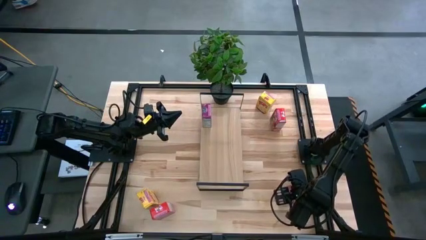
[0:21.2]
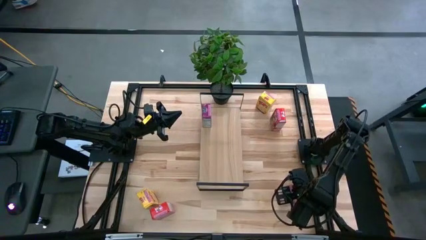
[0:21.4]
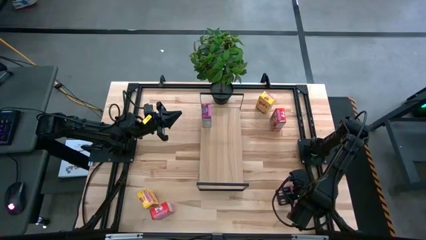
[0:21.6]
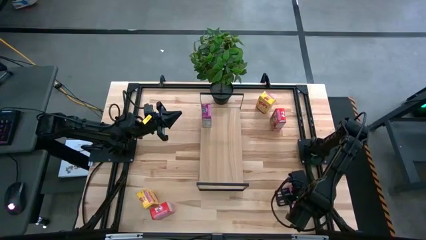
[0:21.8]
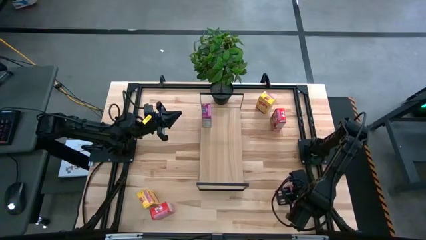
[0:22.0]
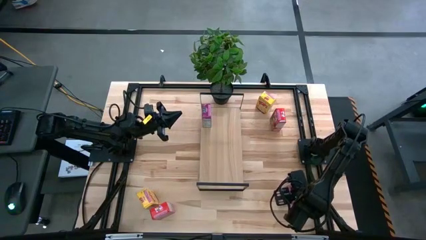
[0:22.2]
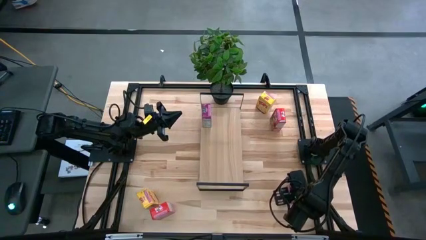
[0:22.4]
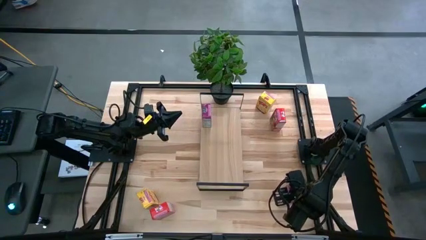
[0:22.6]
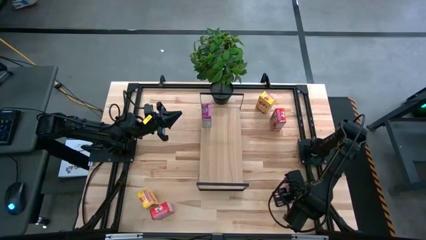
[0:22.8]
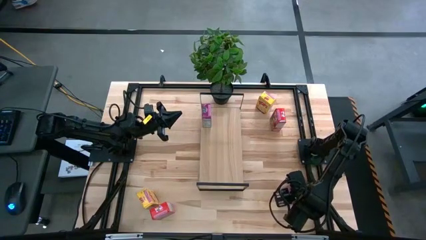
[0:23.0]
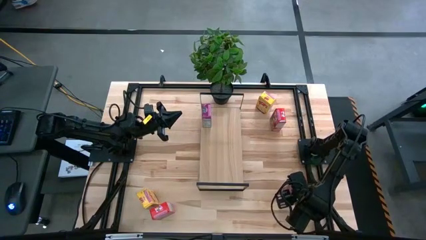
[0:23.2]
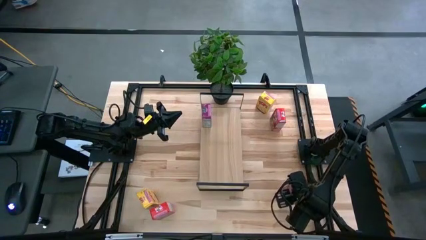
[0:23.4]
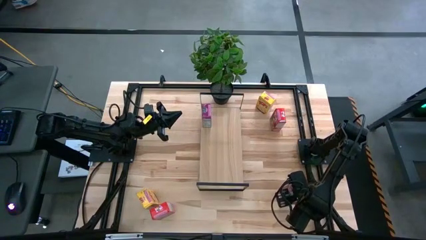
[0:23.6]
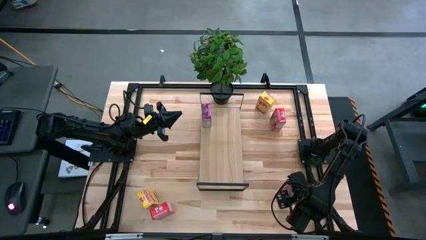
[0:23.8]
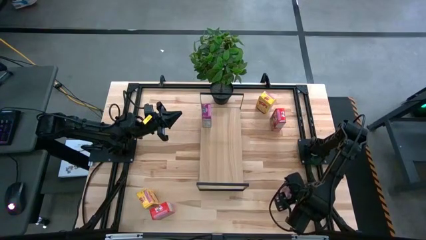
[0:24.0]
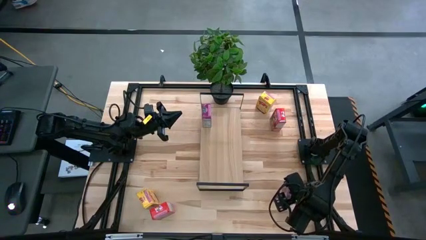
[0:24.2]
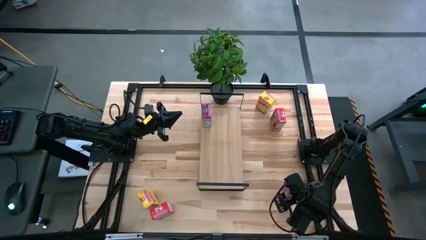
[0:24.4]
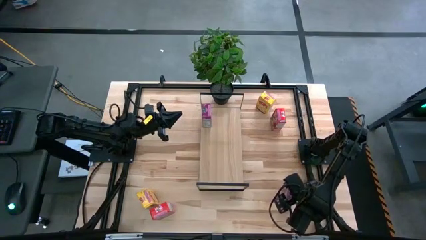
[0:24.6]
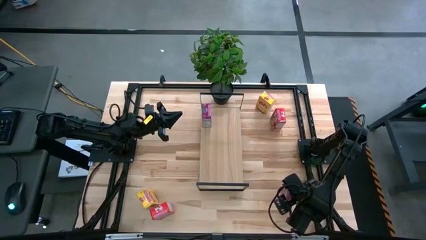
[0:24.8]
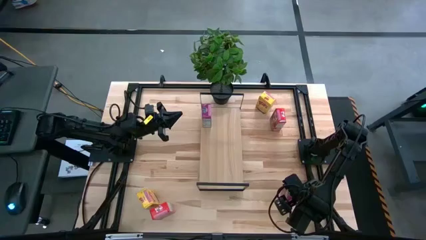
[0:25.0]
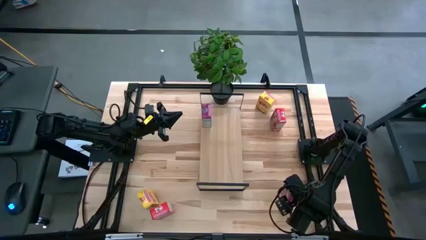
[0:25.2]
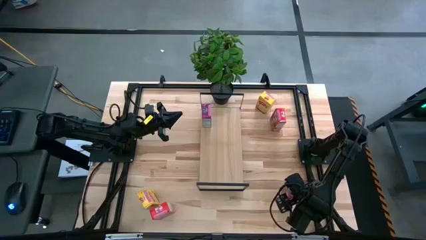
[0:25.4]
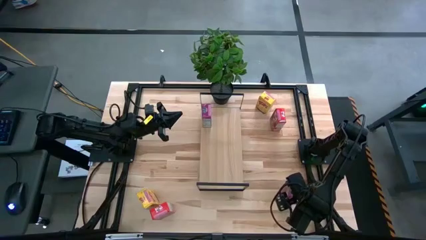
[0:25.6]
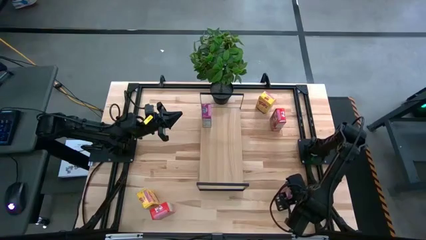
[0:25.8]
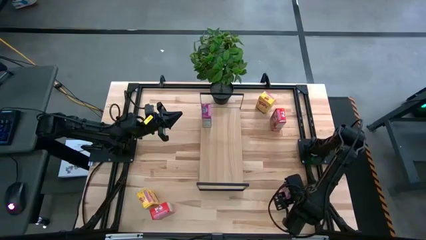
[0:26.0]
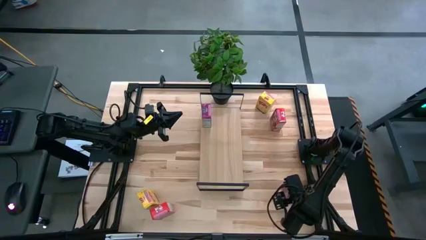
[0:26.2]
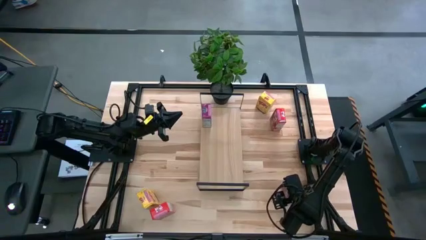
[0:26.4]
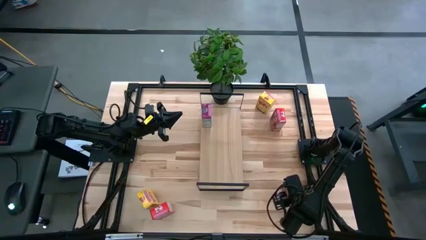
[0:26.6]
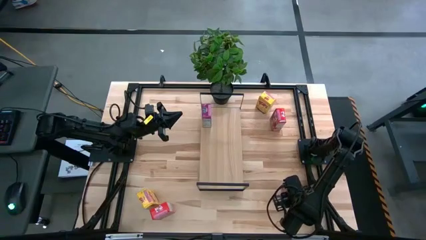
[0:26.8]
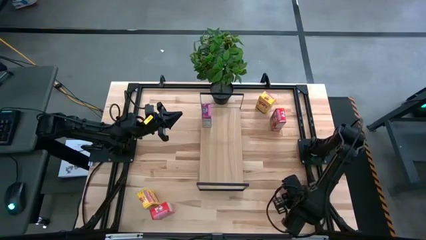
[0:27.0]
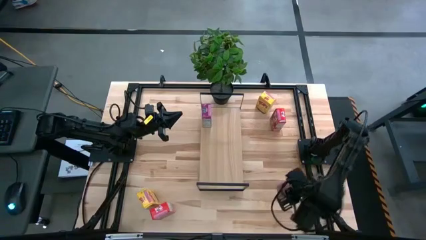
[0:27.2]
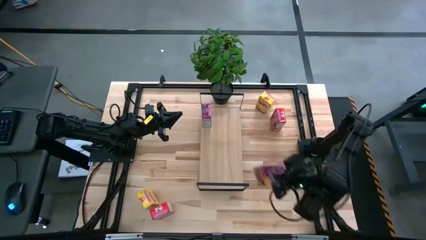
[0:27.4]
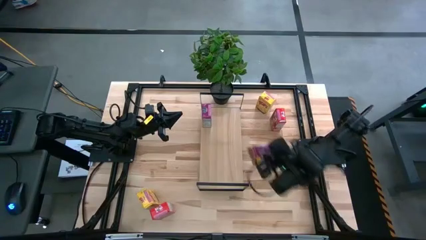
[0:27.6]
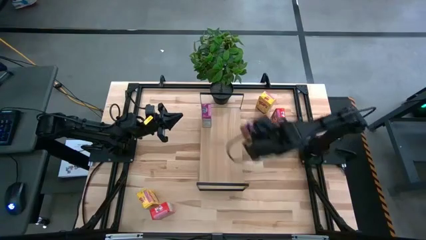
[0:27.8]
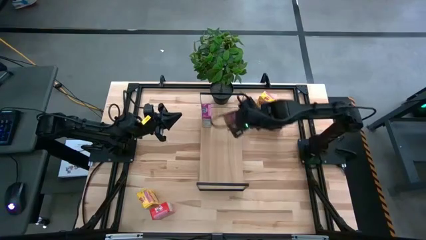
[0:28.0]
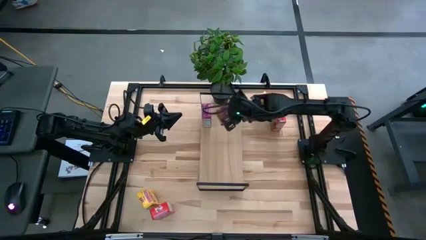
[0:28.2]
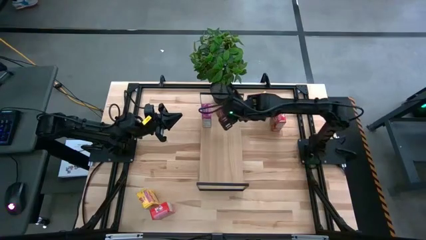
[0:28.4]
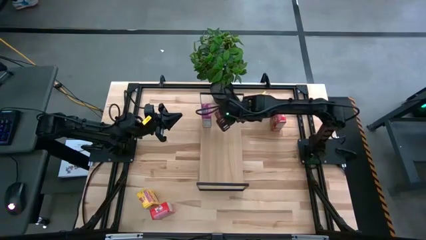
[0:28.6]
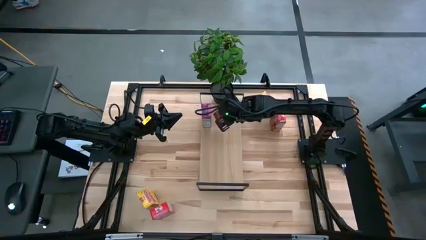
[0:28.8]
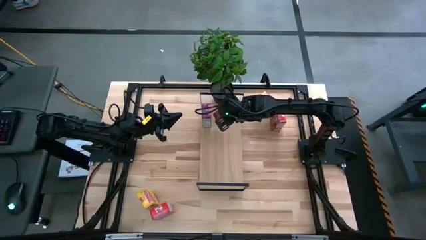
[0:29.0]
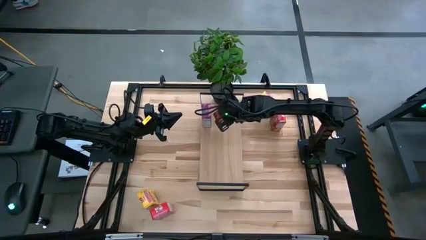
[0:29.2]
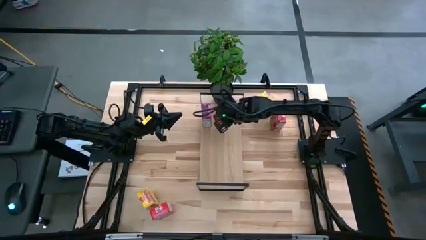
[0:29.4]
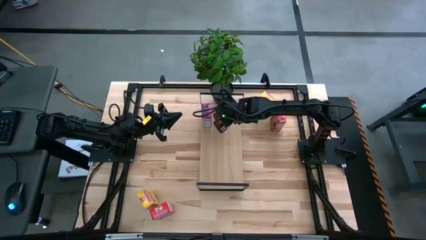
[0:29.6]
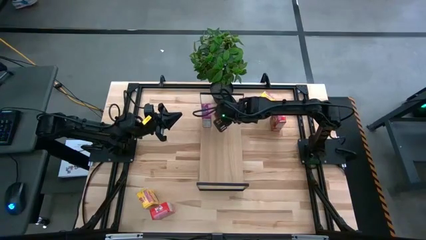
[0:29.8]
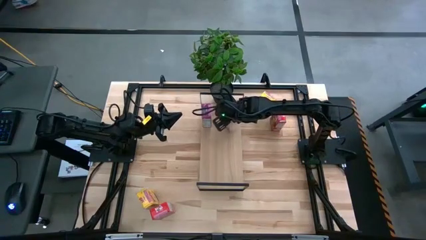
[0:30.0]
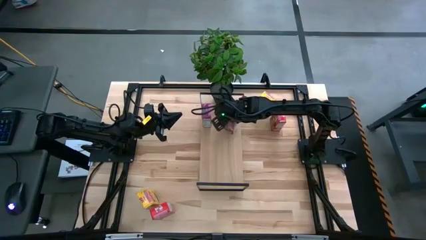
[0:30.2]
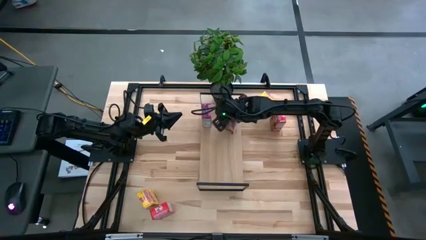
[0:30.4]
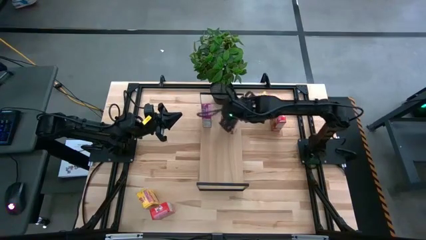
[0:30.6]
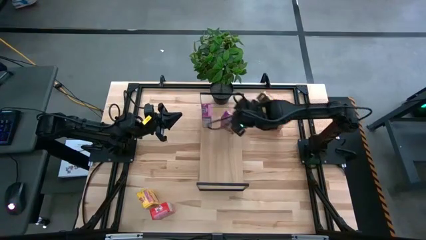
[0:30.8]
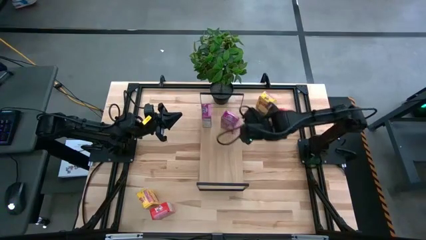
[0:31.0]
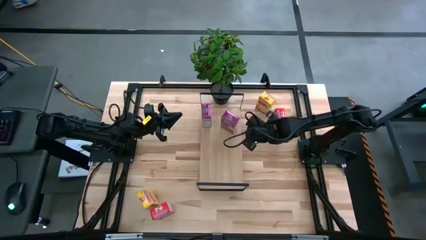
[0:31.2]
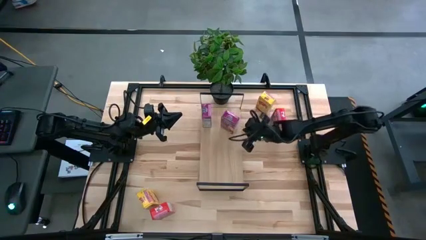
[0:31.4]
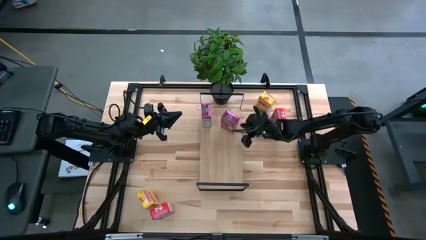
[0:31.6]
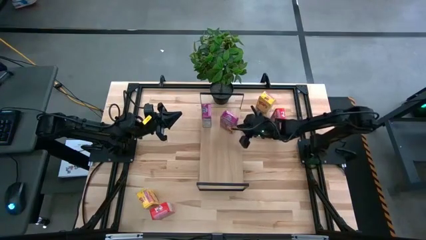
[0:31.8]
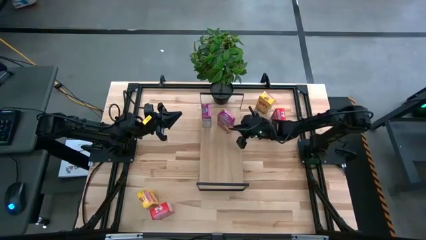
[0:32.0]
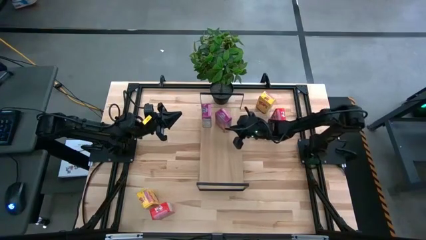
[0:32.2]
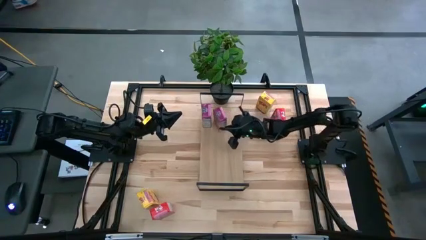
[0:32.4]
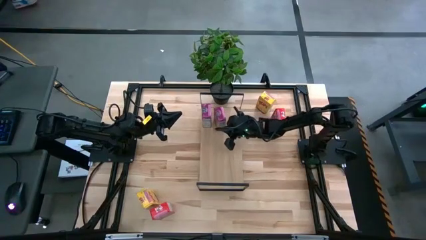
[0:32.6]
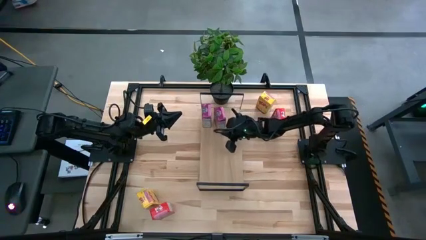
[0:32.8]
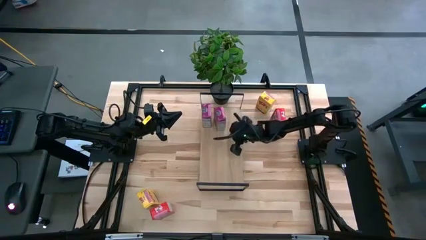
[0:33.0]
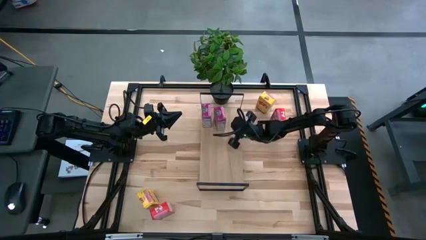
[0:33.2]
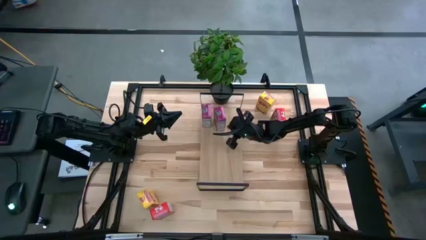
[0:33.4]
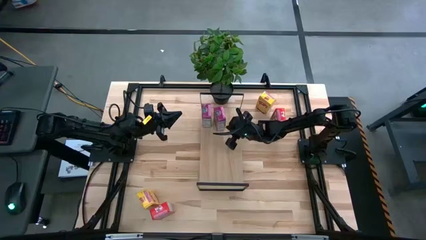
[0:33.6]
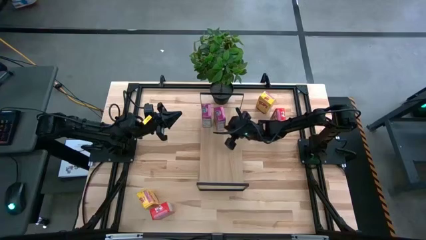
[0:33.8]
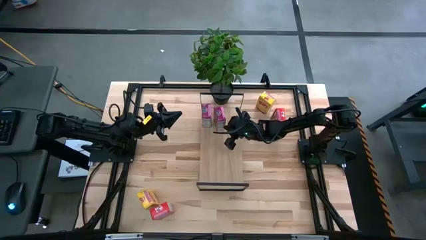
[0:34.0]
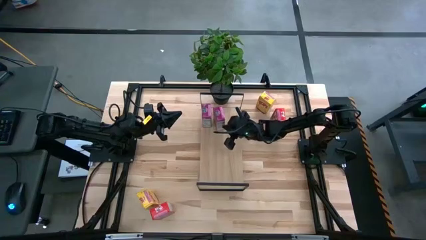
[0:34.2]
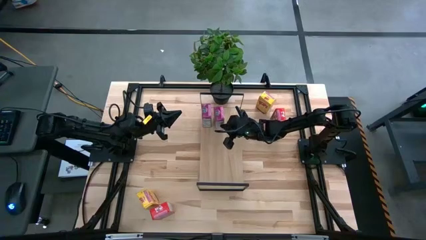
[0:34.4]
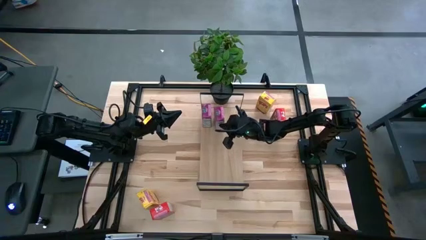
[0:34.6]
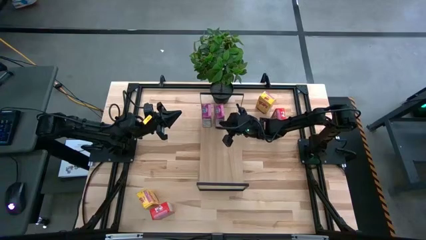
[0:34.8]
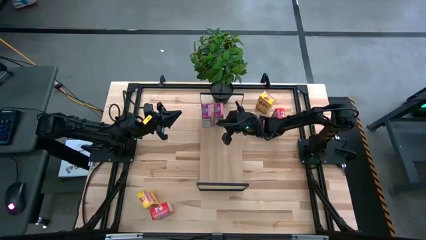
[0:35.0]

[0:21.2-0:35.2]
Task: Stack cereal on shelf
Put the purple cereal box on the shelf aligned with the other purple cereal box
